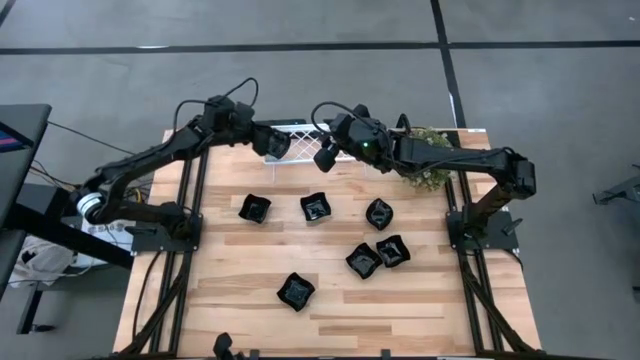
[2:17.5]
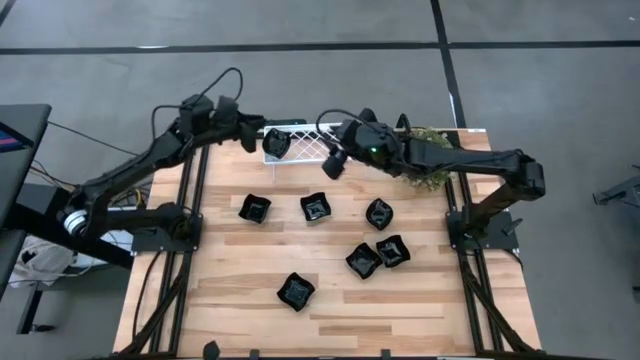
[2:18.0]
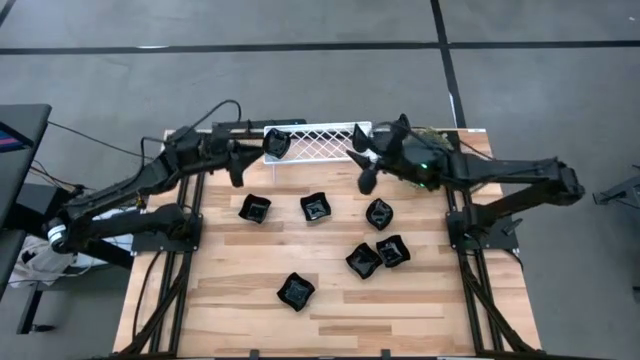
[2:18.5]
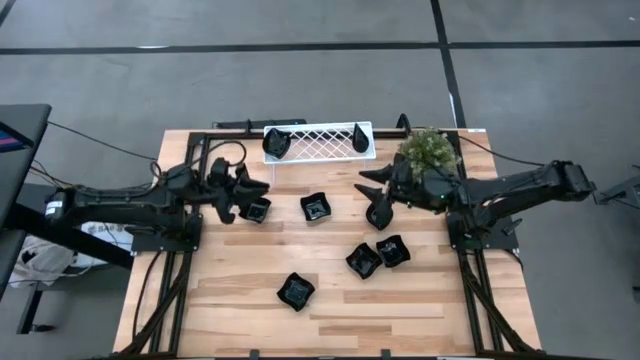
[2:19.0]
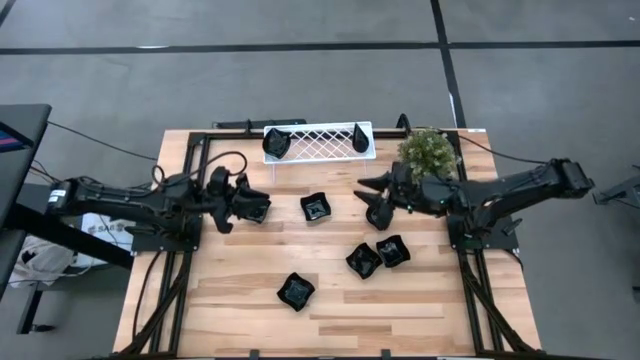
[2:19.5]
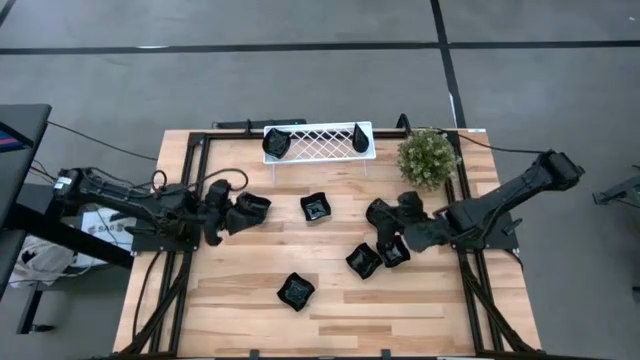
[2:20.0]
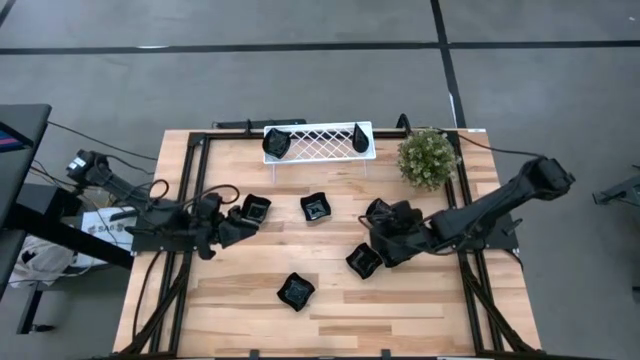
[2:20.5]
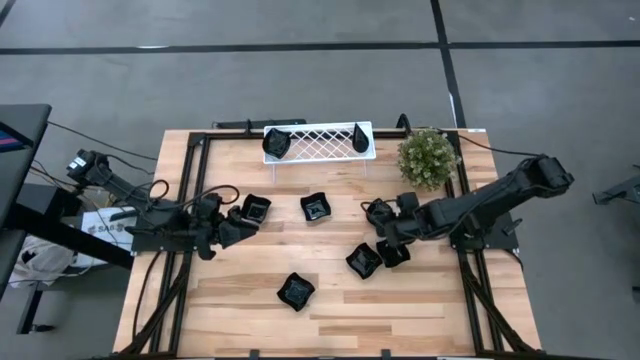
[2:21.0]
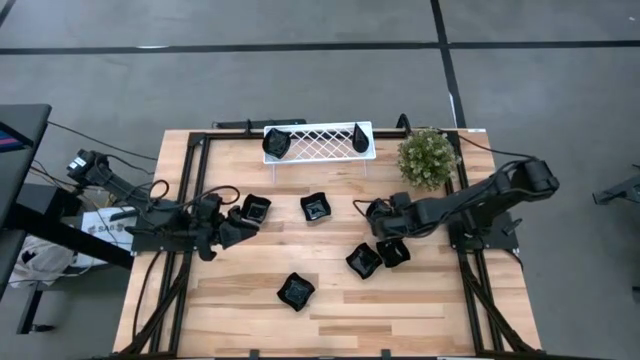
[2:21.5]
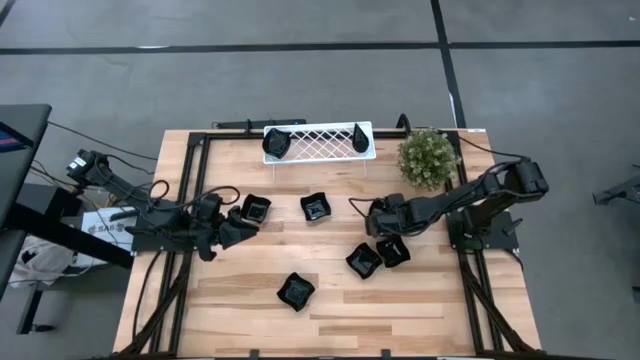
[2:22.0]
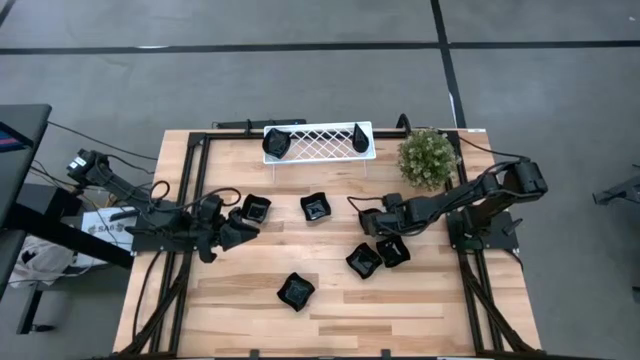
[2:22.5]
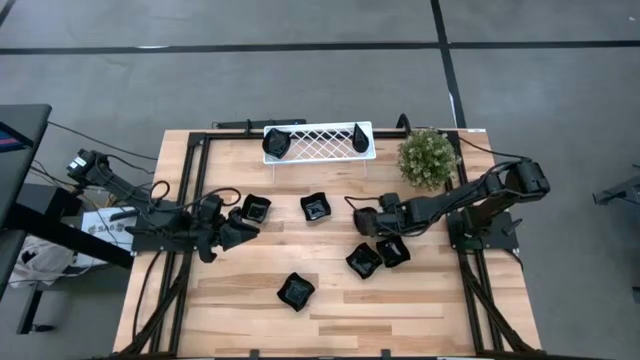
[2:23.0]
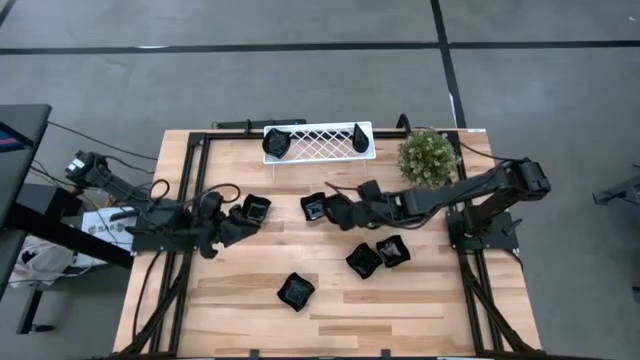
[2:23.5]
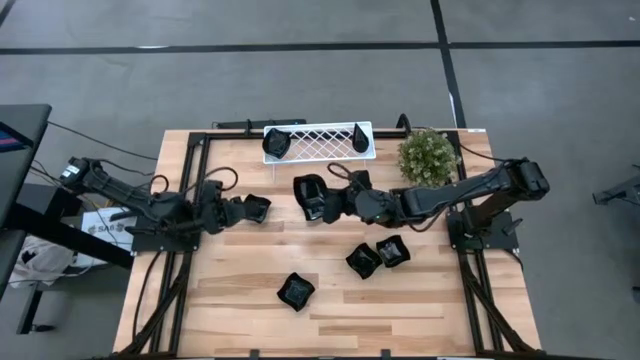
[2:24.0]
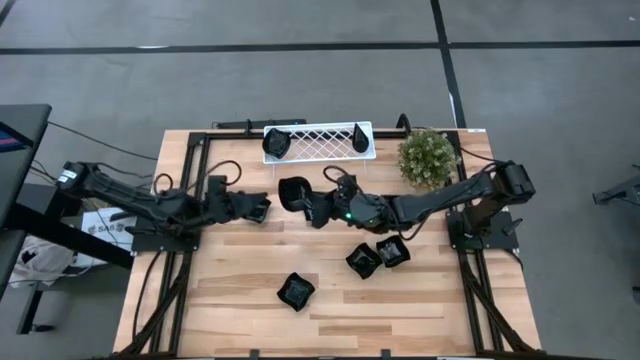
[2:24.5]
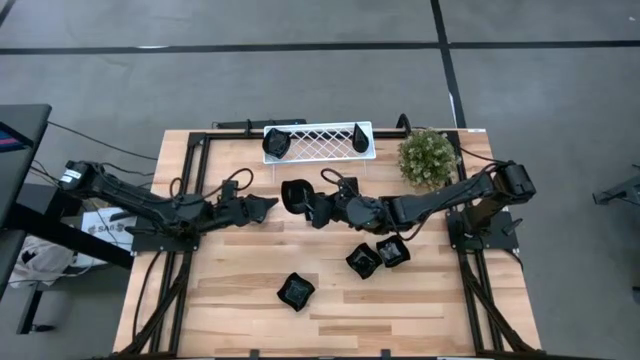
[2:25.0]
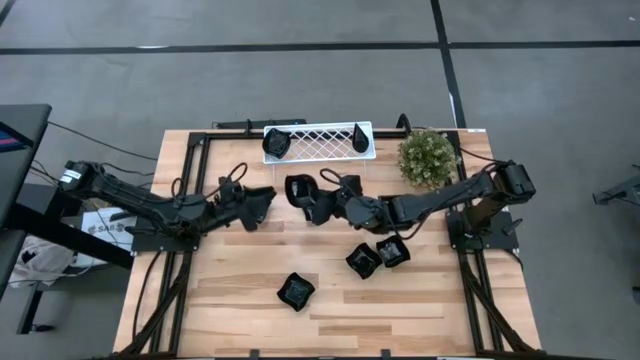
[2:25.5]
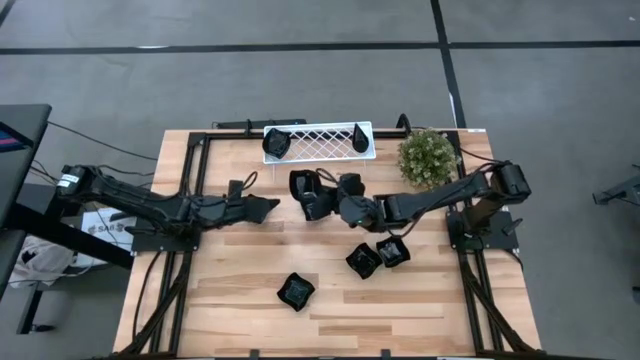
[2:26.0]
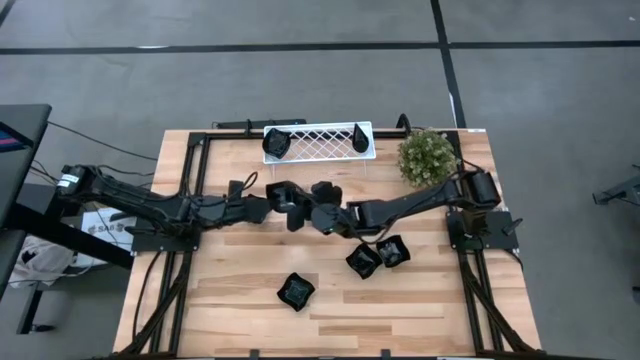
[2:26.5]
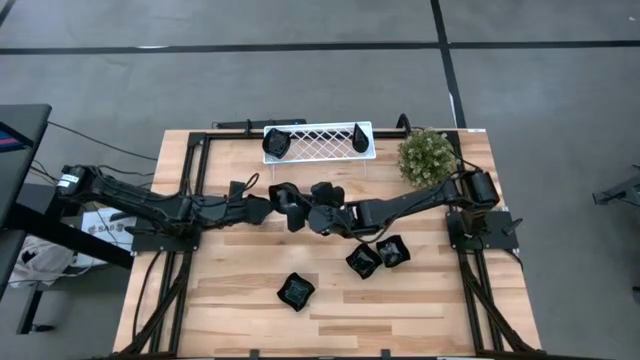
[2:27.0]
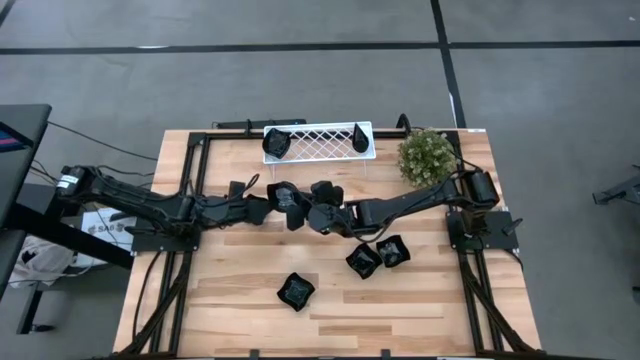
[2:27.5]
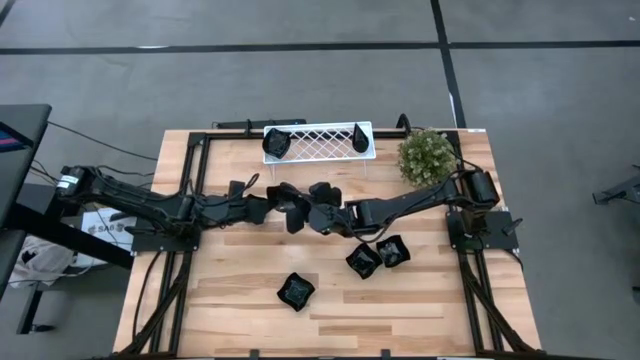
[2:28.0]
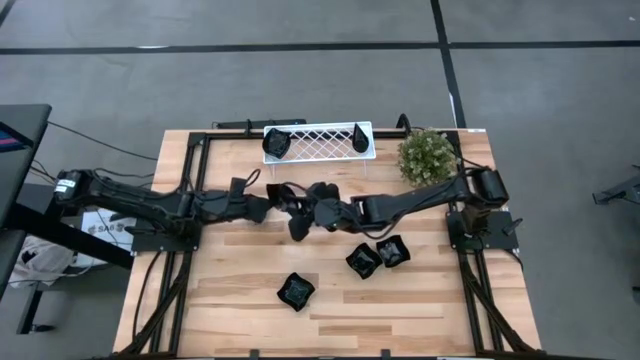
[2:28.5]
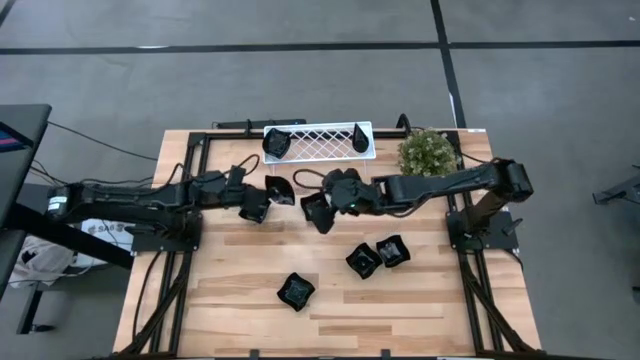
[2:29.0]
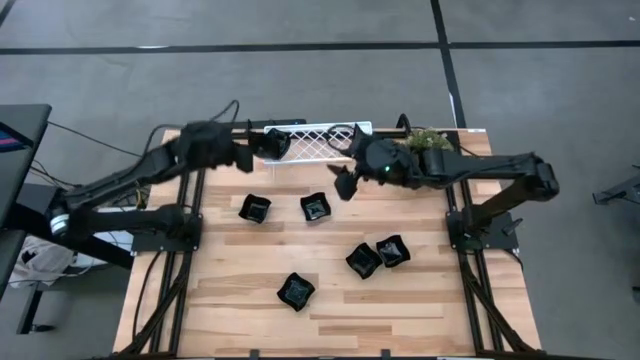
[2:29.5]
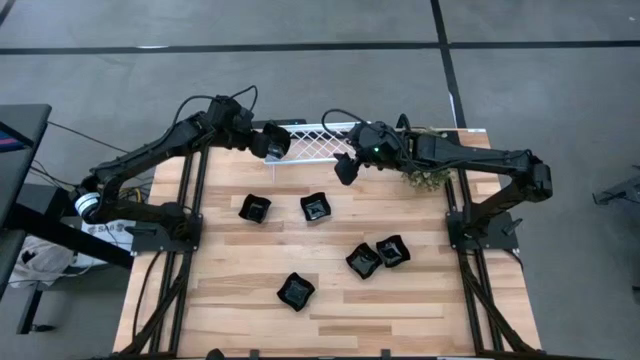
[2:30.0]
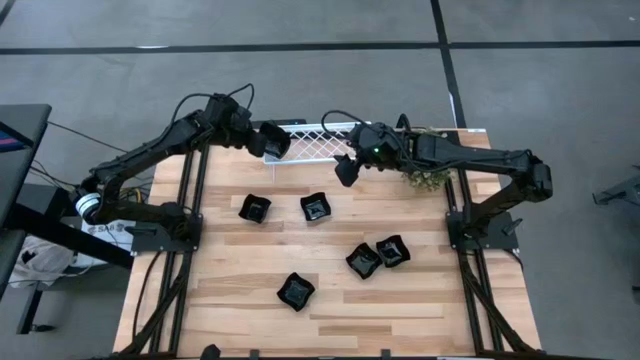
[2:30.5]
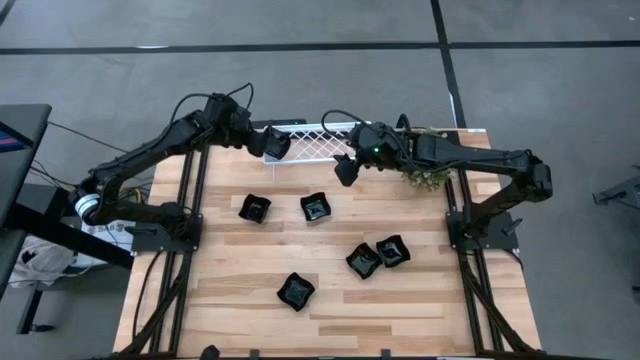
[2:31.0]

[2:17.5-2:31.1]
Task: Pick & Place Mini shaped plates
Stack the black leaf shaped plate on top of the black leaf shaped plate on the shelf

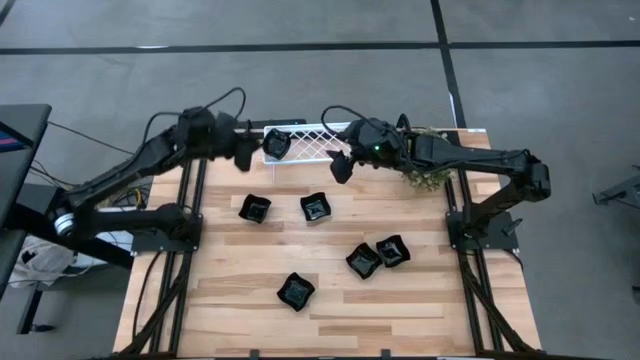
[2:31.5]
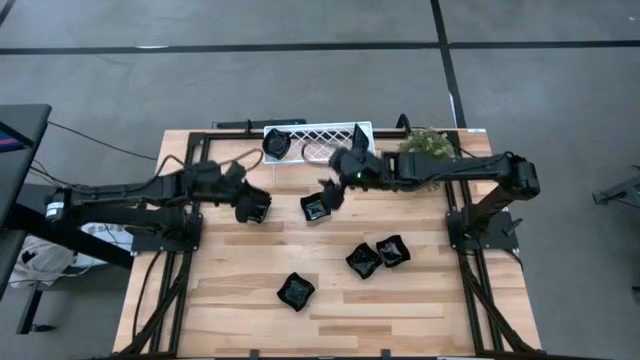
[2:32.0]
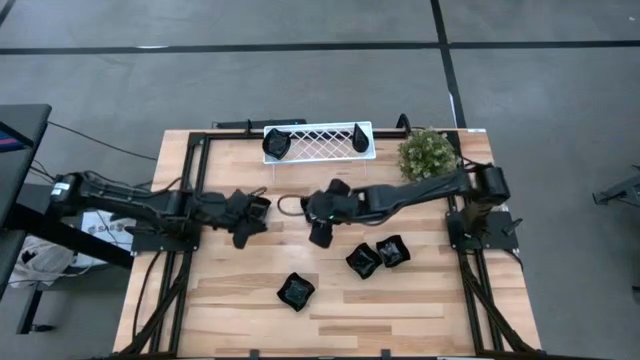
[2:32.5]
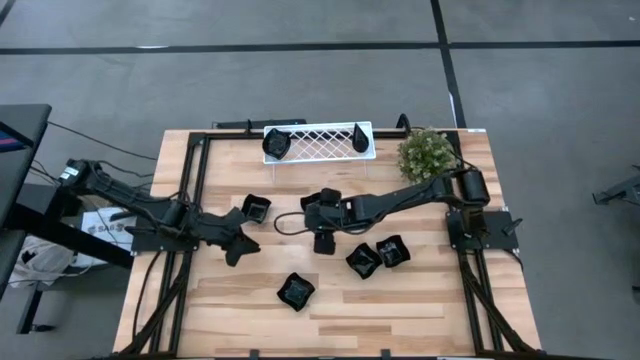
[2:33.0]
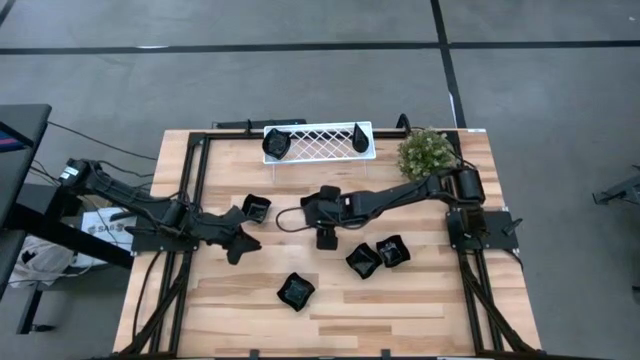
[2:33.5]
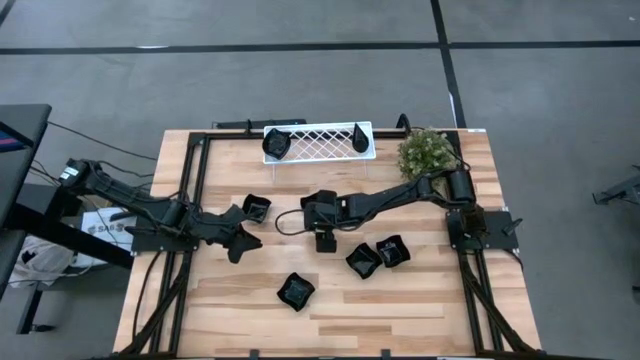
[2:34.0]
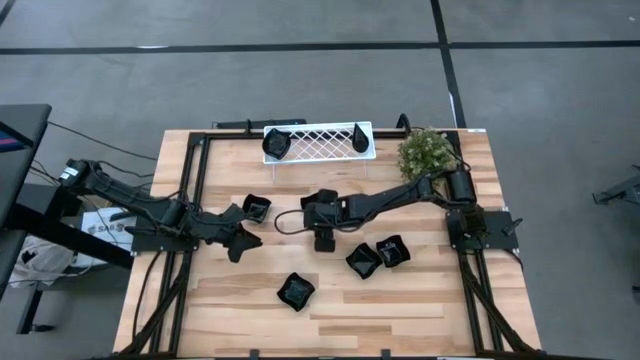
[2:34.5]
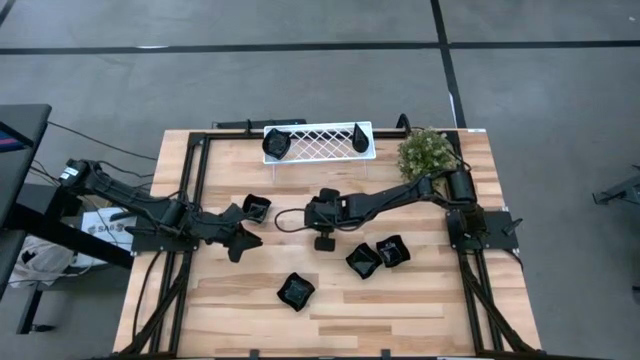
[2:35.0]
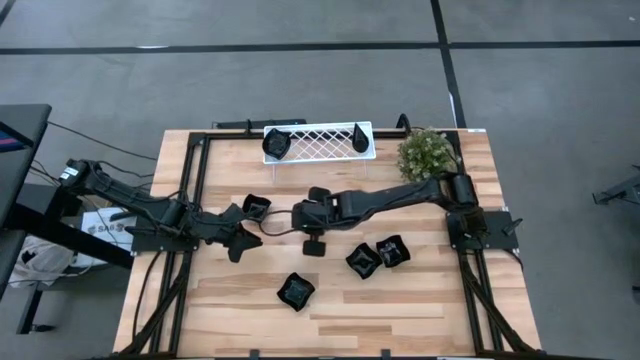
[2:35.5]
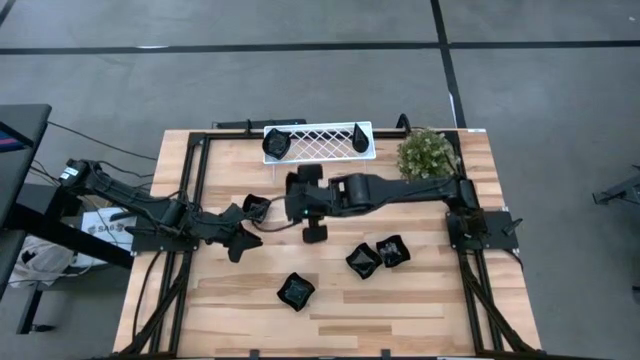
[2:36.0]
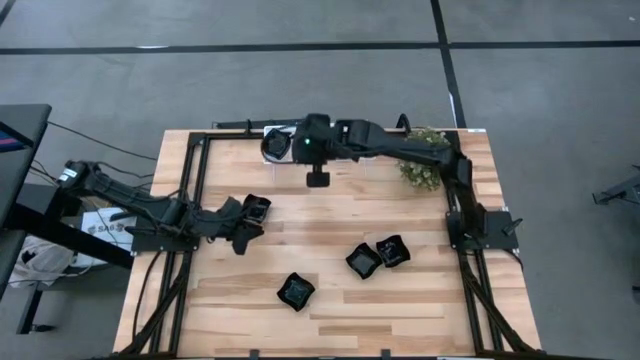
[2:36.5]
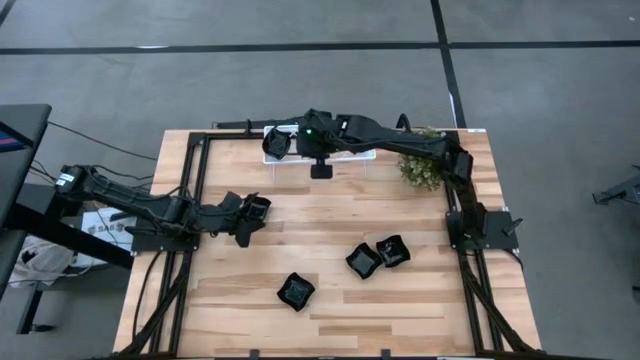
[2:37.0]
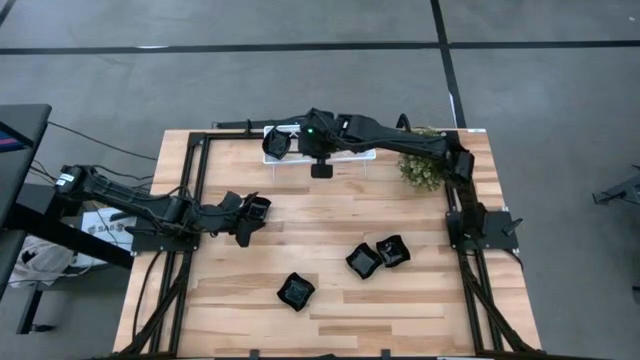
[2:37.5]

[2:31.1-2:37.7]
Put the black distorted square plate on the shelf

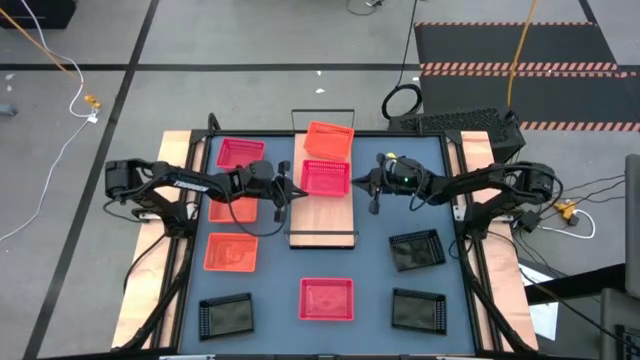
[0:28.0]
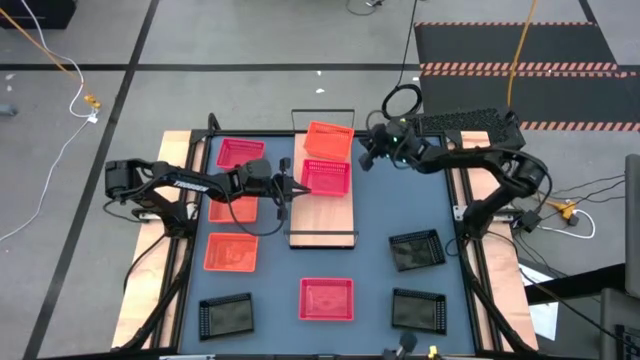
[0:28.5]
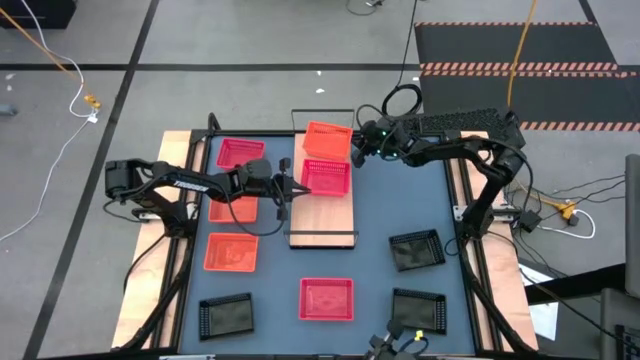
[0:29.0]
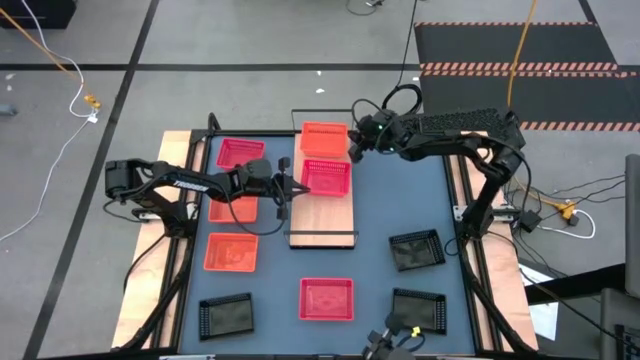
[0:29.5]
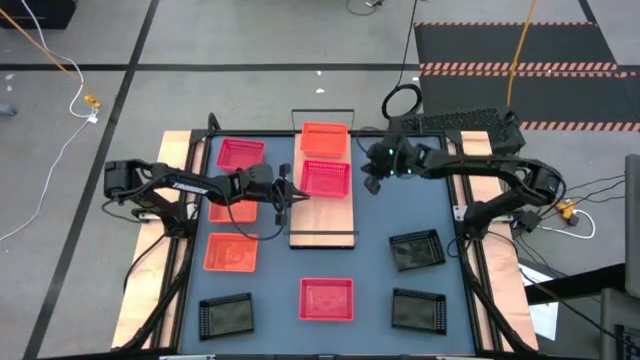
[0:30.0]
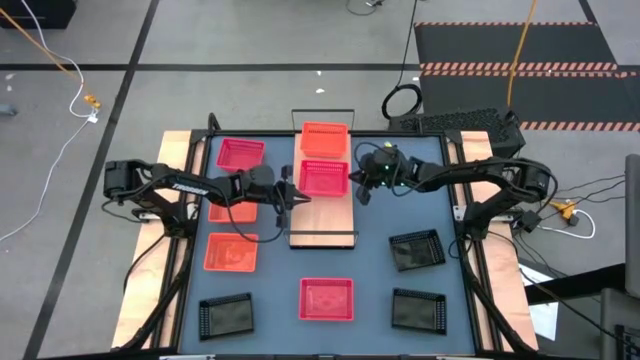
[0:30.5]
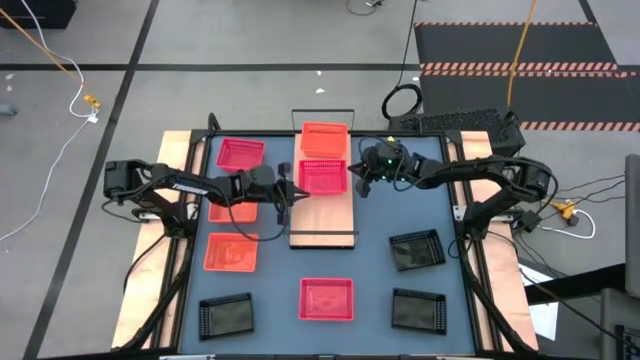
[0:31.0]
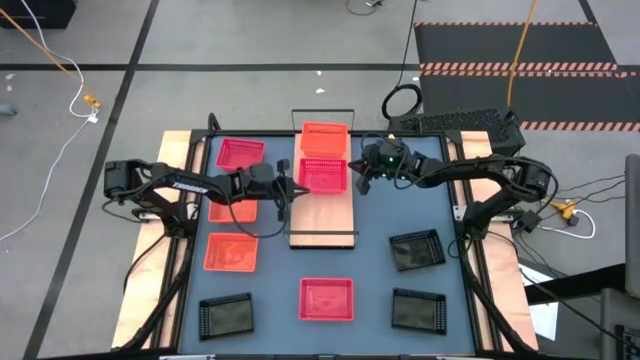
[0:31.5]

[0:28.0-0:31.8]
Task: Stack baskets on shelf by color
Adjust the bins on the shelf
